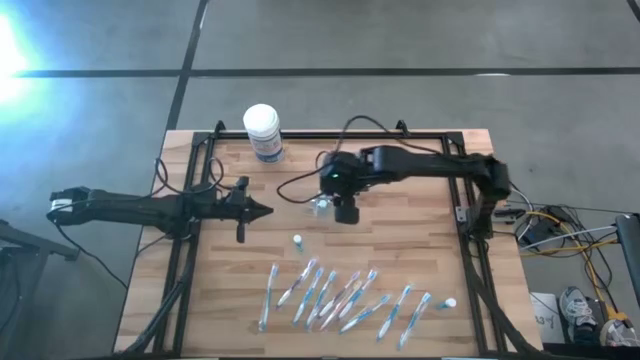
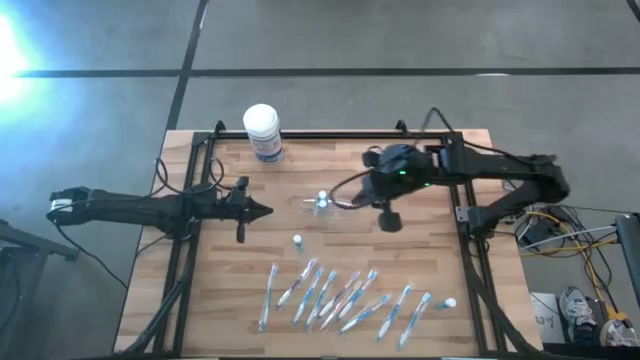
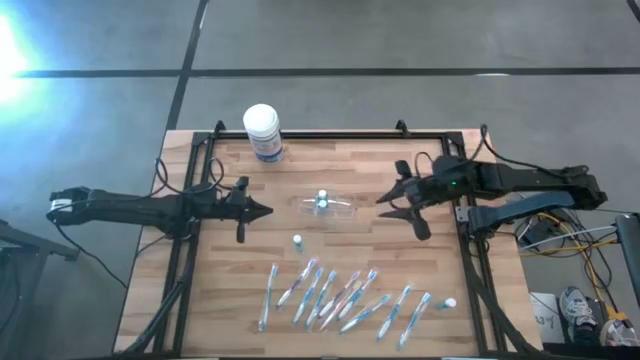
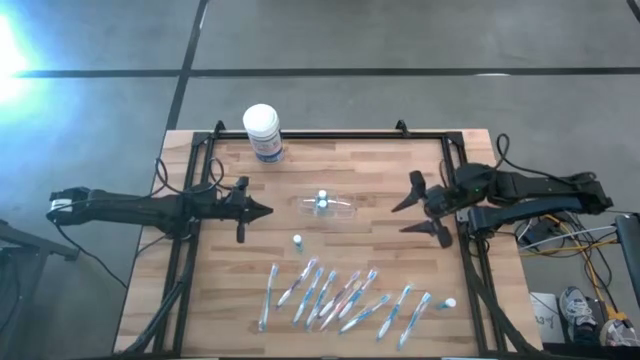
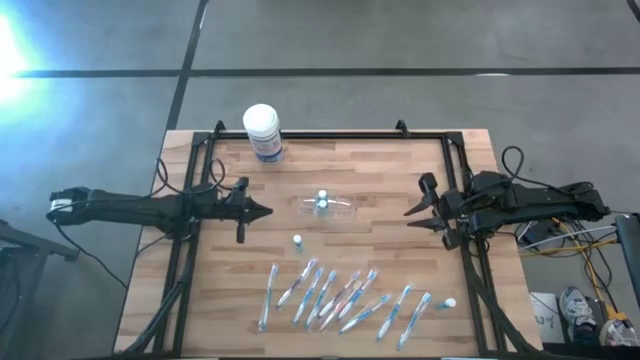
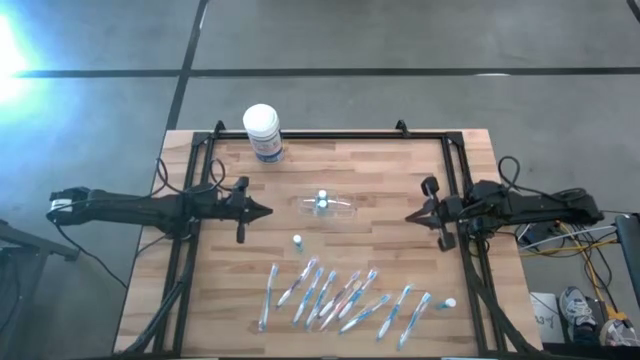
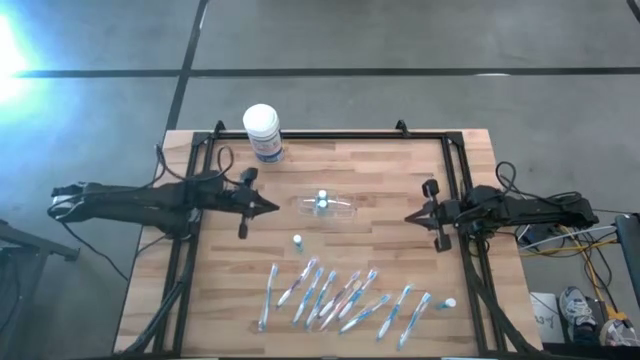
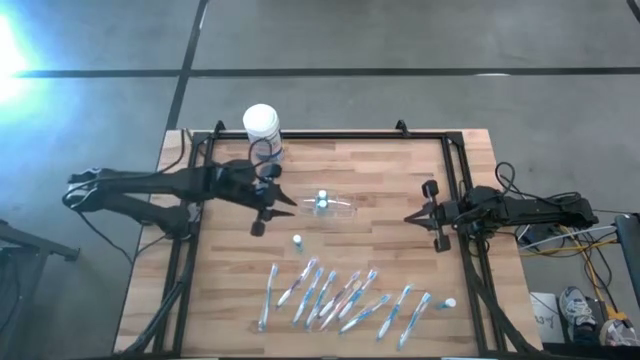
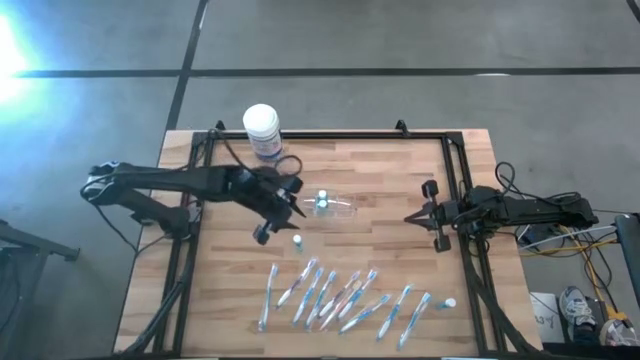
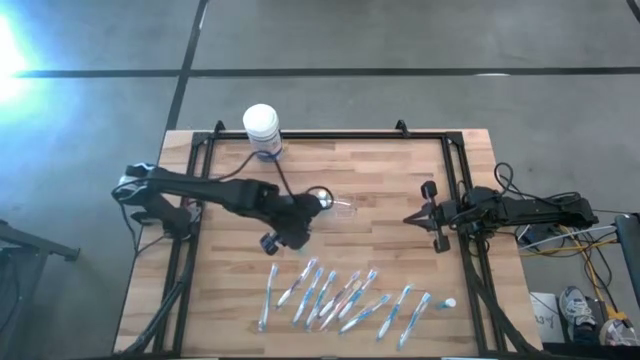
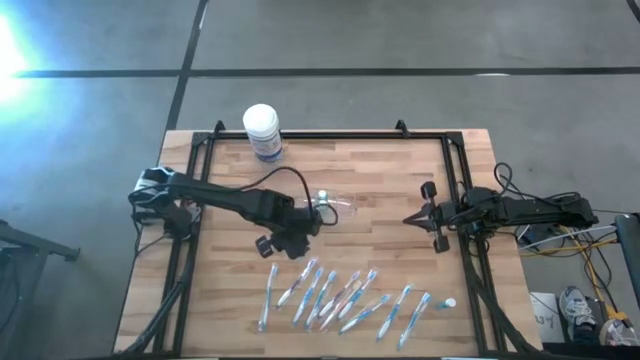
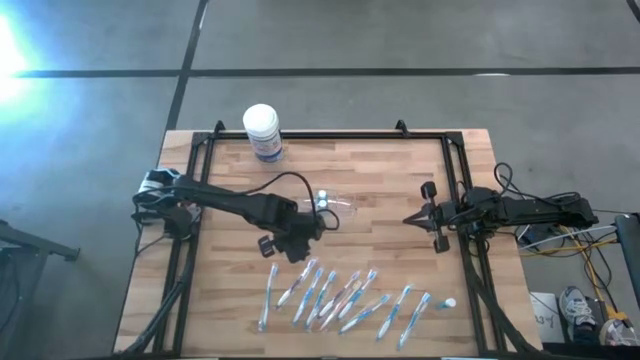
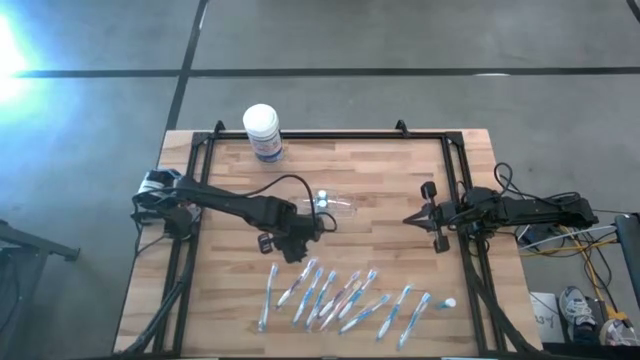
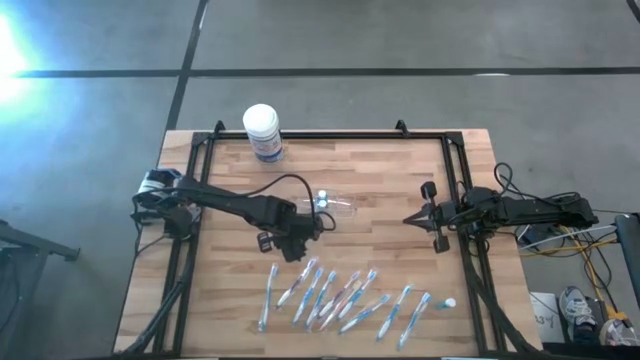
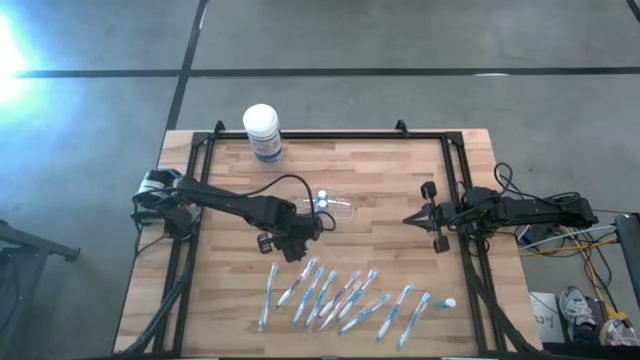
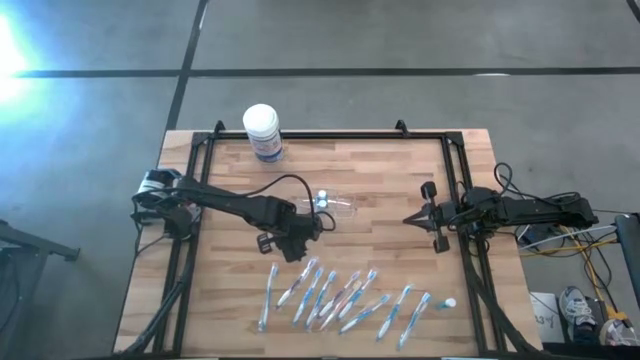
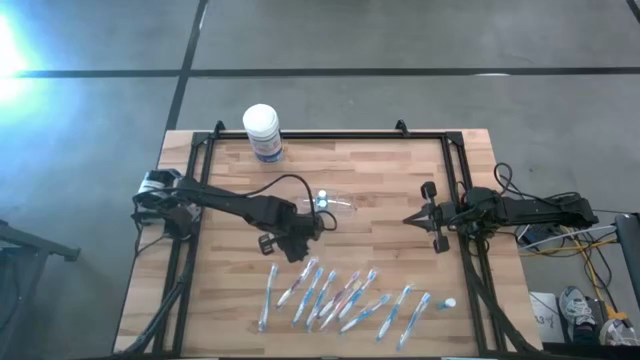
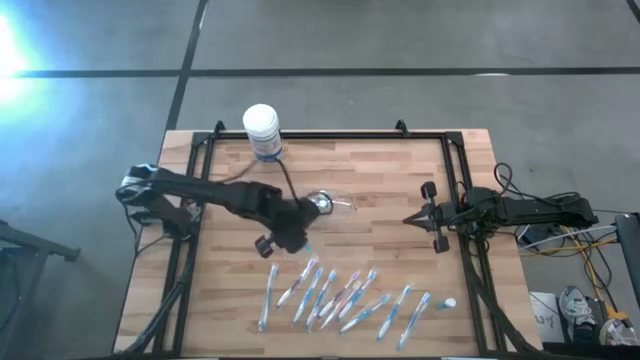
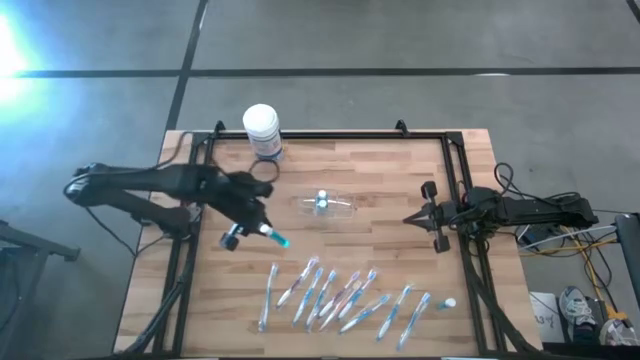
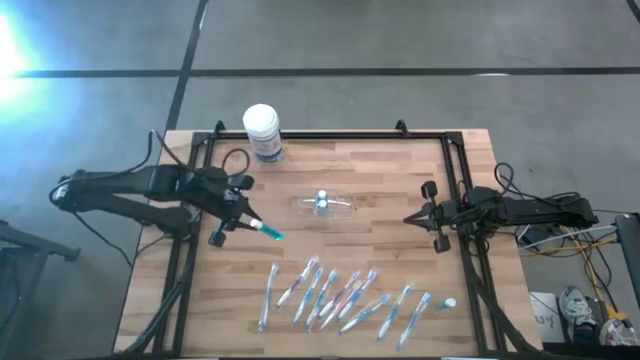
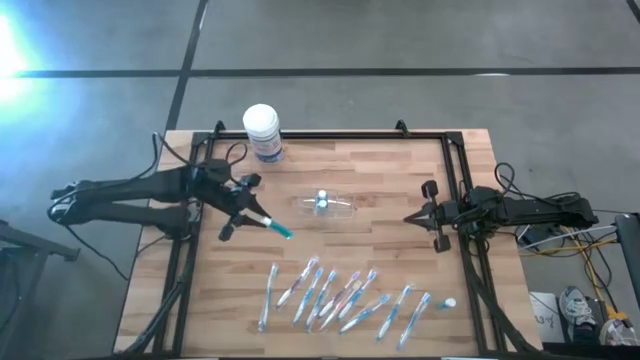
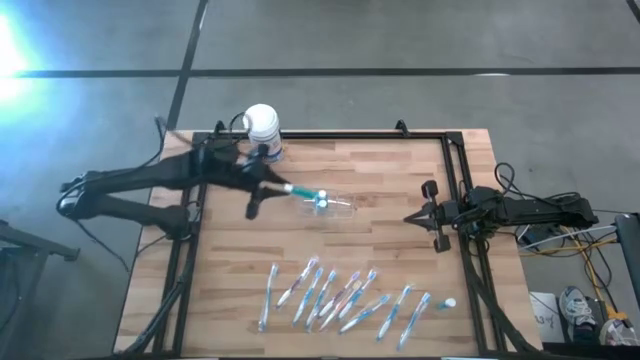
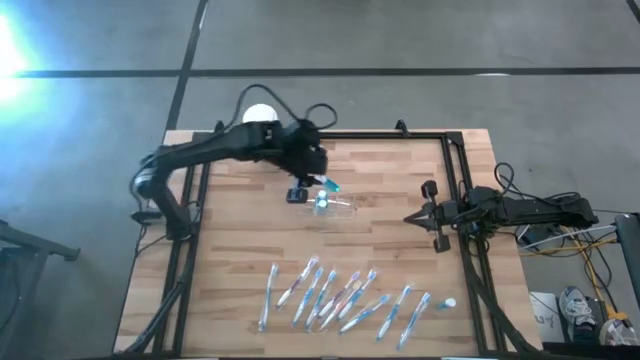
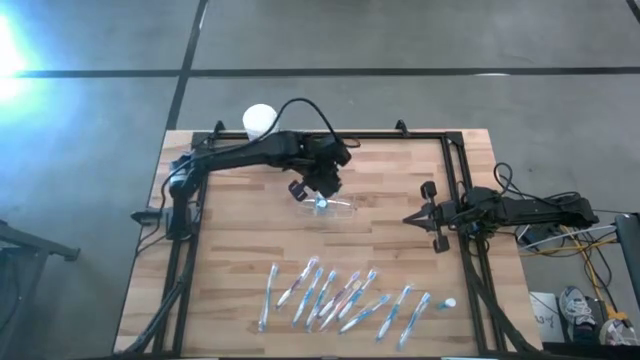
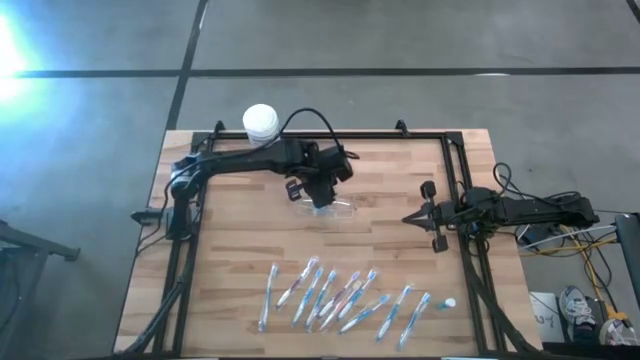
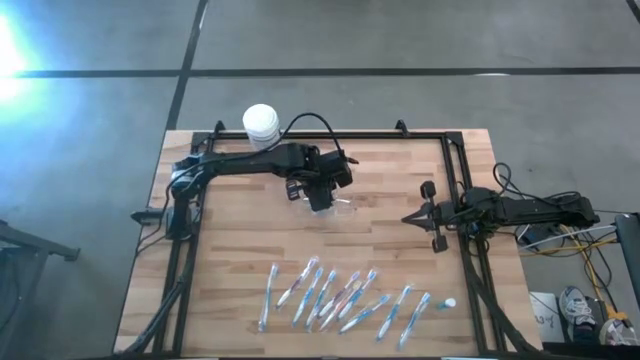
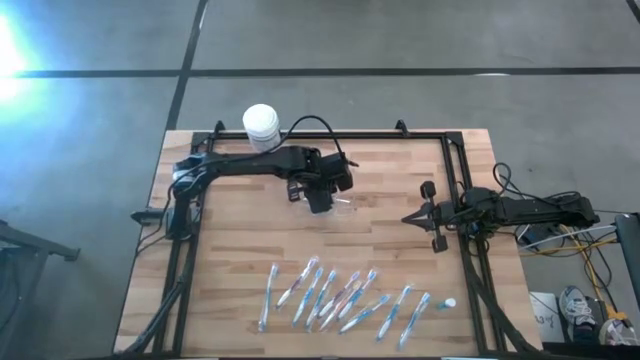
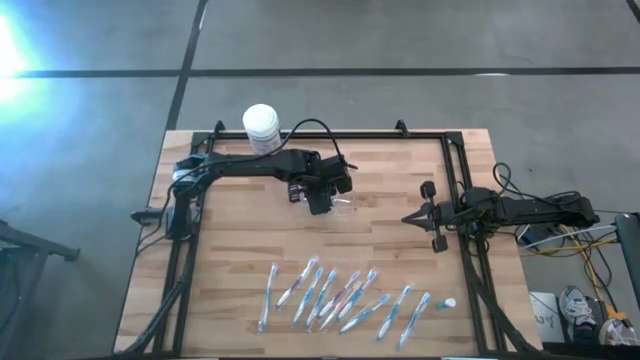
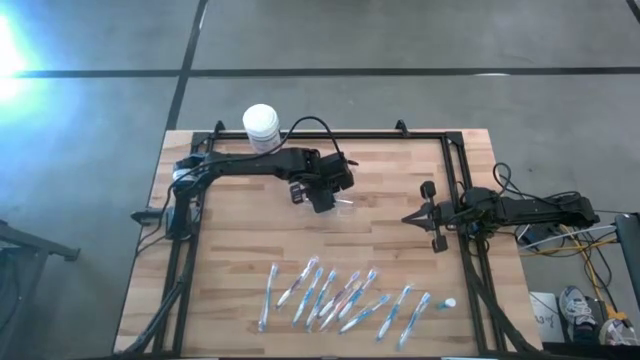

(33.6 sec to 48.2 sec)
Task: Pick & Place toothbrushing station
Put the blue mouthwash into the transparent bin organizer

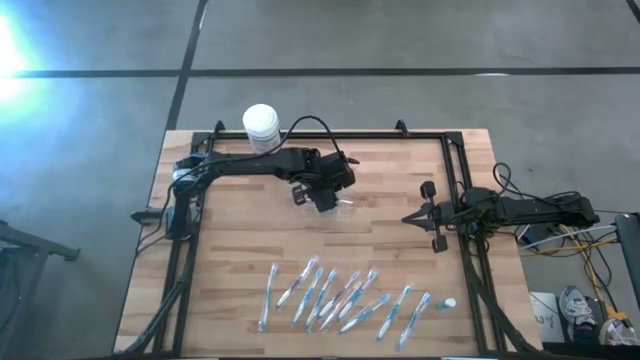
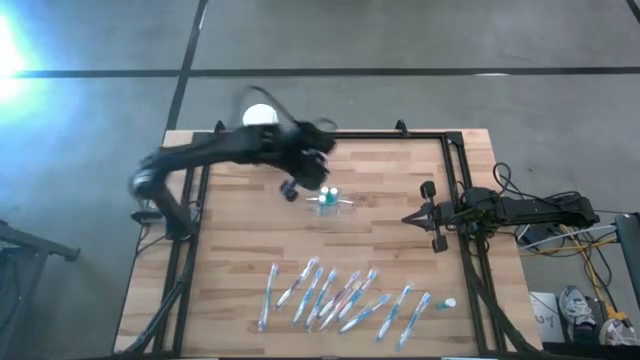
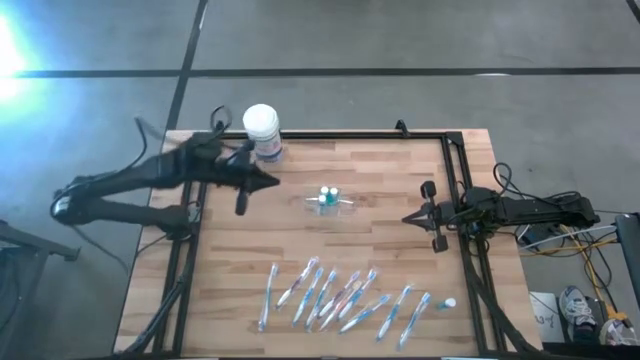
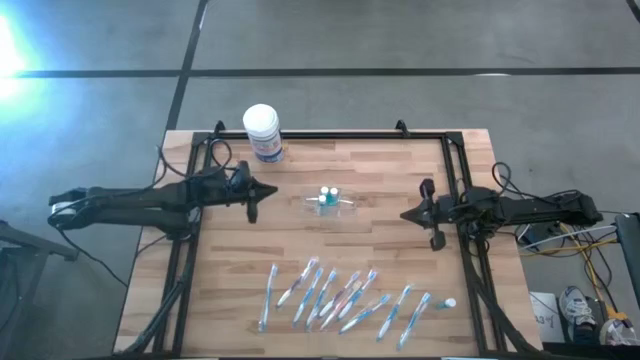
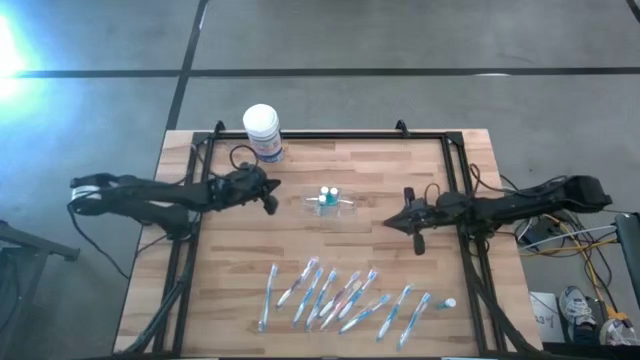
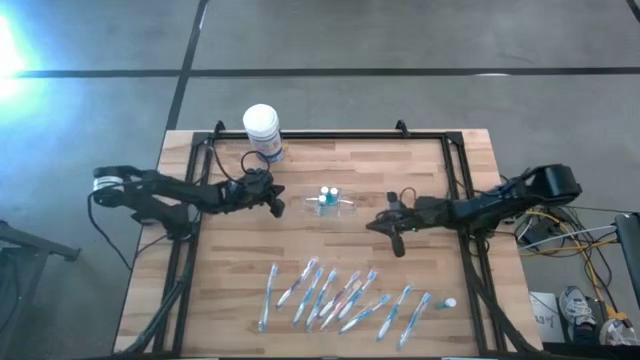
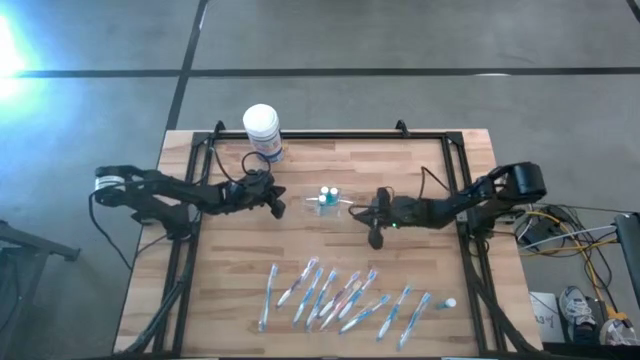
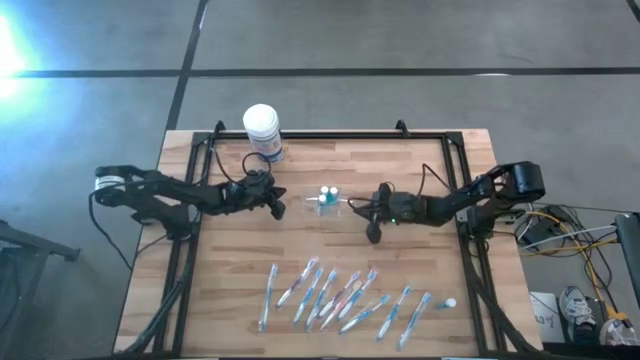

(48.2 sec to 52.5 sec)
Adjust the transparent bin organizer

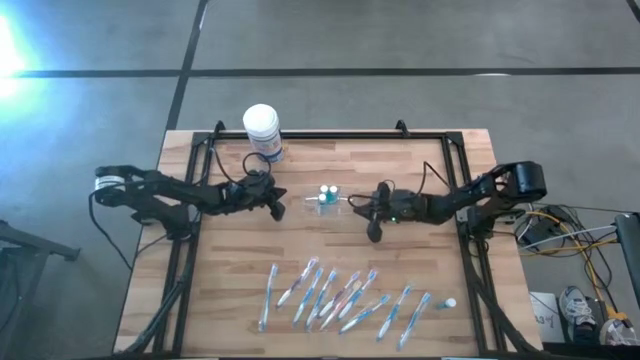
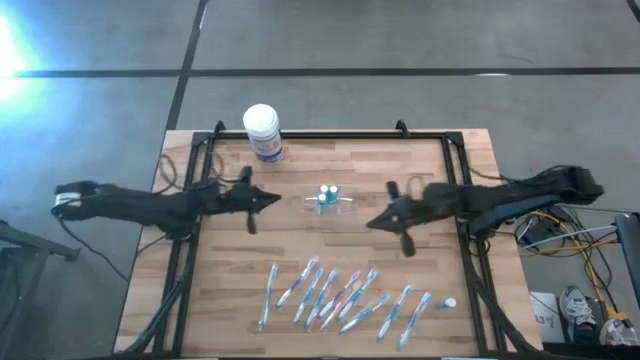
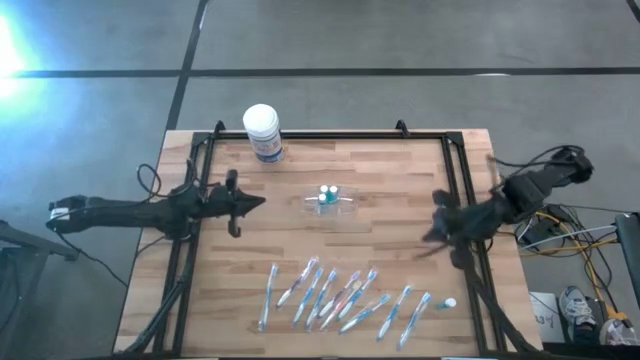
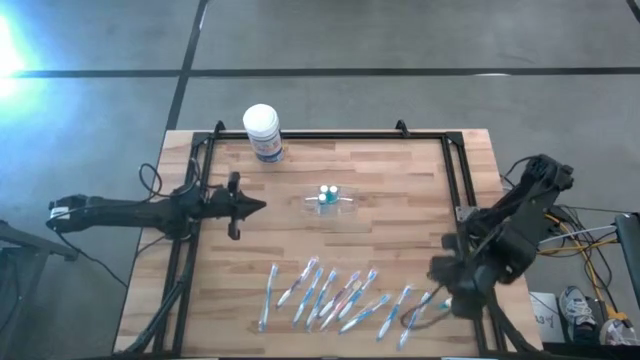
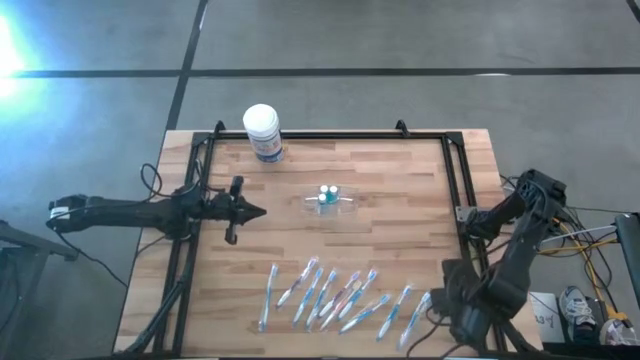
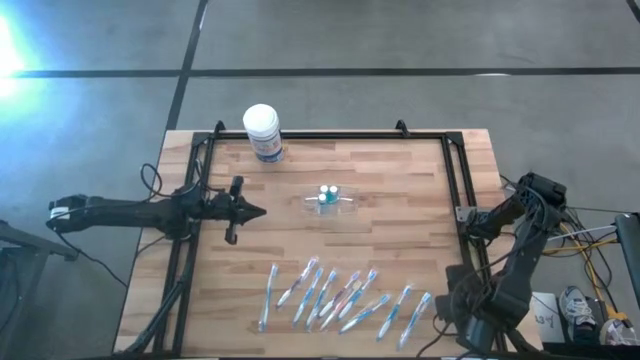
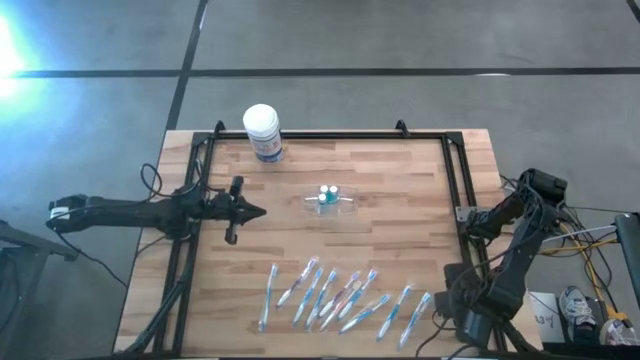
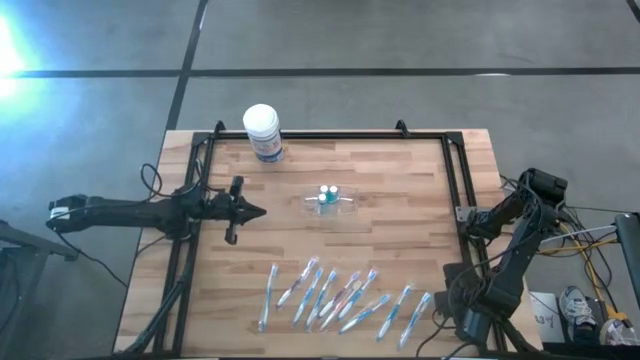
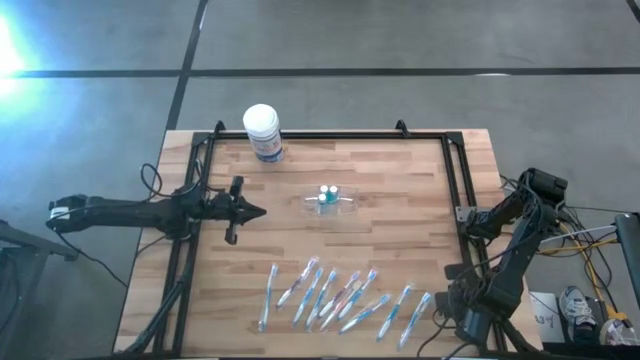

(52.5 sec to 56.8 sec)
Put the blue mouthwash into the transparent bin organizer
